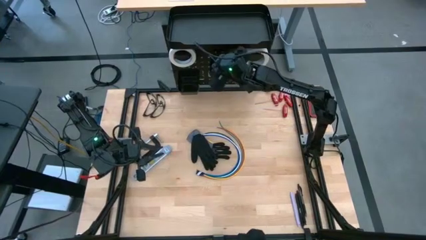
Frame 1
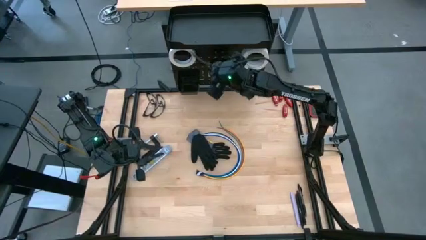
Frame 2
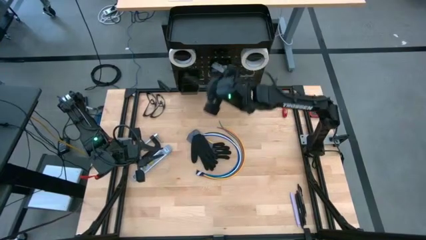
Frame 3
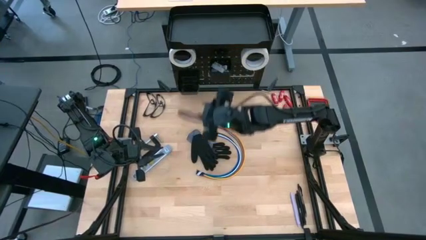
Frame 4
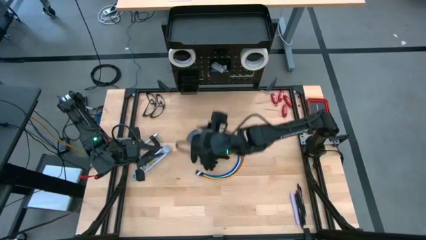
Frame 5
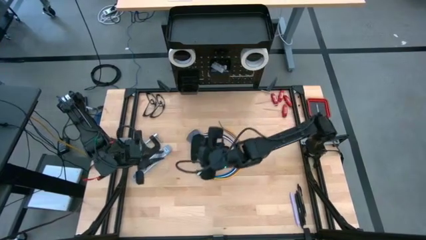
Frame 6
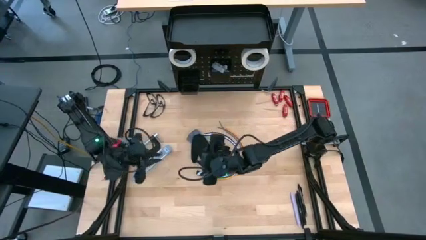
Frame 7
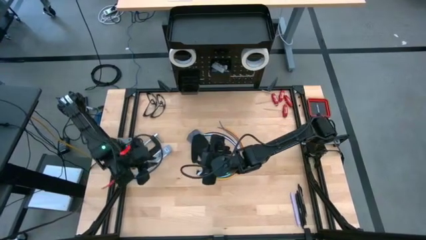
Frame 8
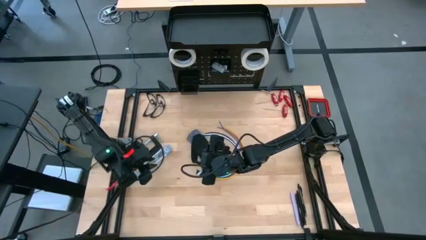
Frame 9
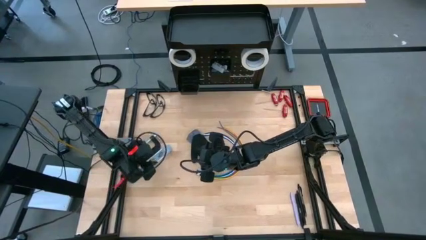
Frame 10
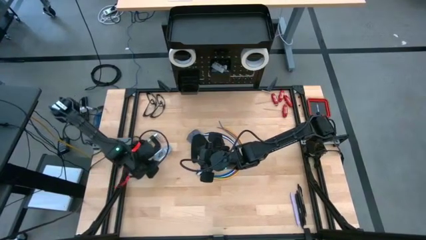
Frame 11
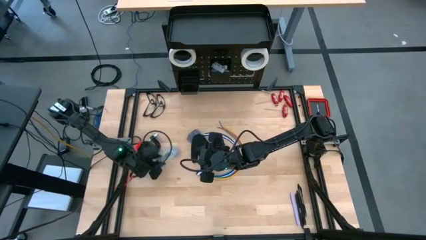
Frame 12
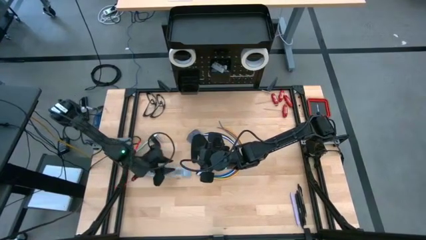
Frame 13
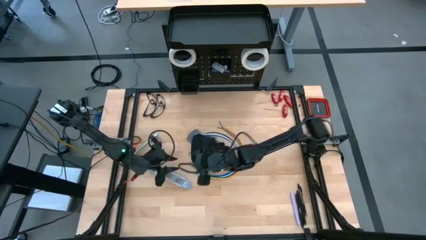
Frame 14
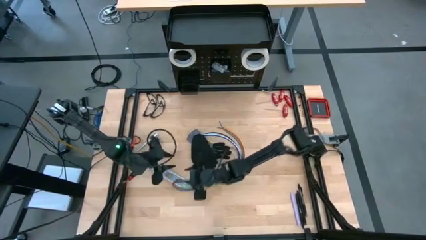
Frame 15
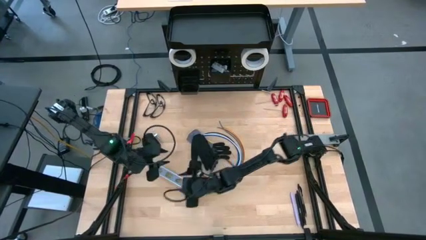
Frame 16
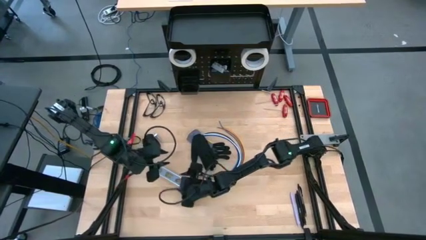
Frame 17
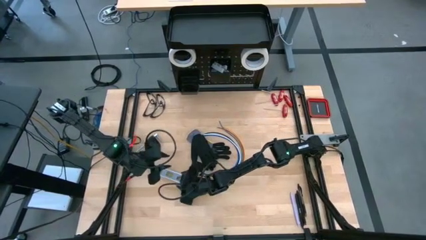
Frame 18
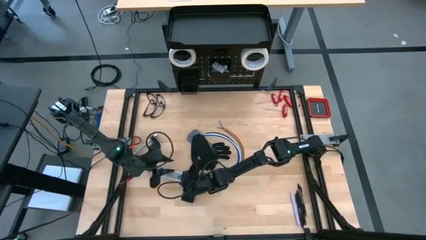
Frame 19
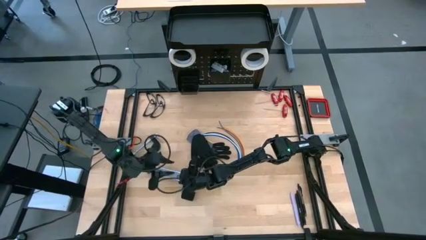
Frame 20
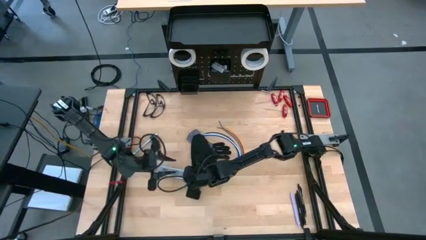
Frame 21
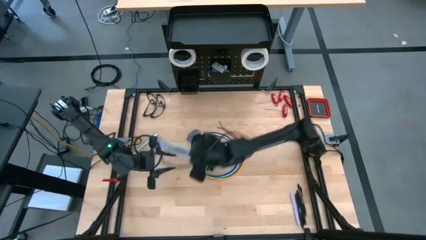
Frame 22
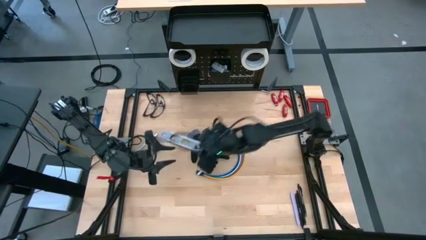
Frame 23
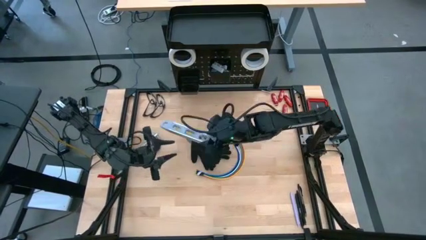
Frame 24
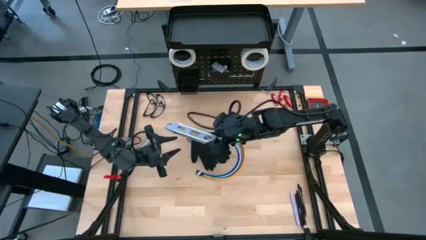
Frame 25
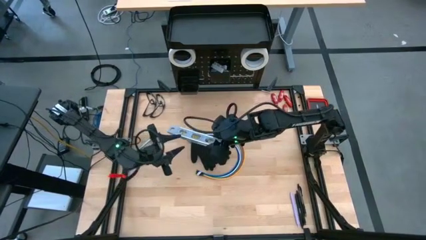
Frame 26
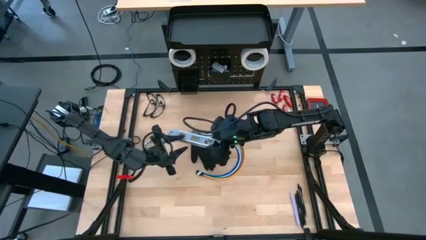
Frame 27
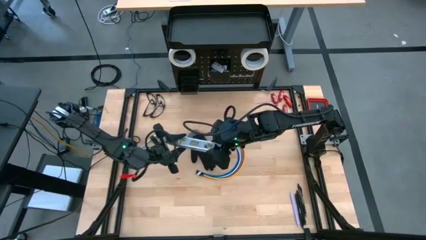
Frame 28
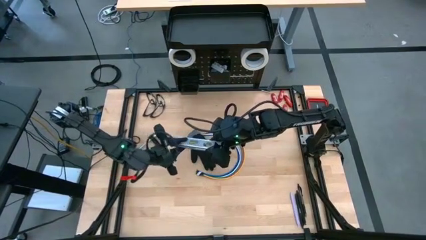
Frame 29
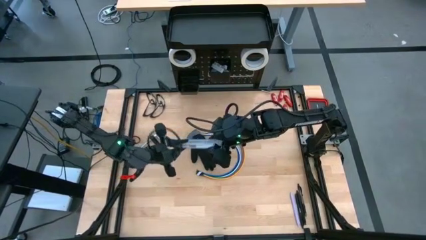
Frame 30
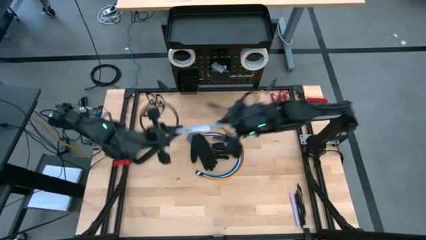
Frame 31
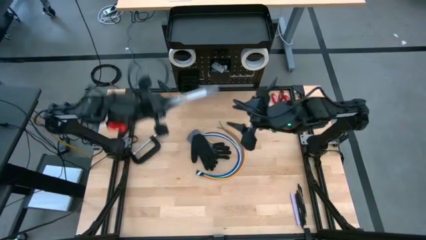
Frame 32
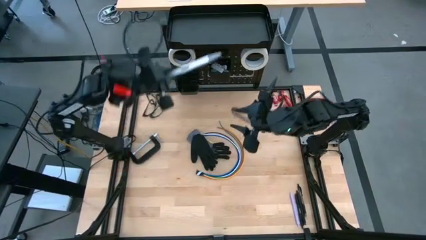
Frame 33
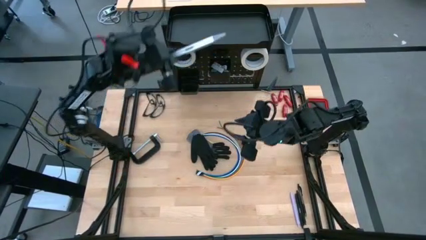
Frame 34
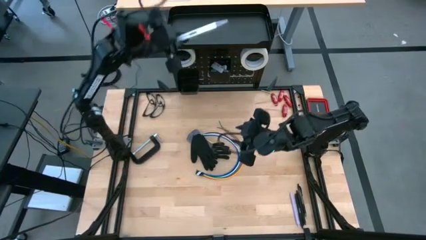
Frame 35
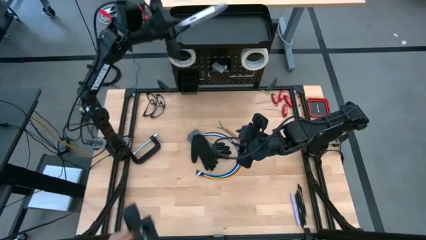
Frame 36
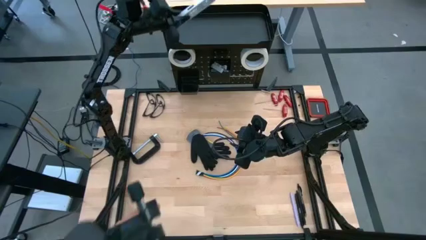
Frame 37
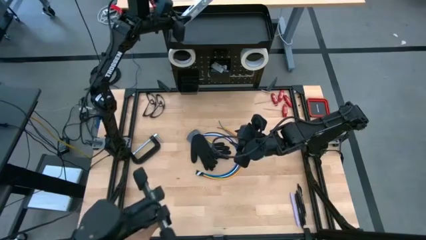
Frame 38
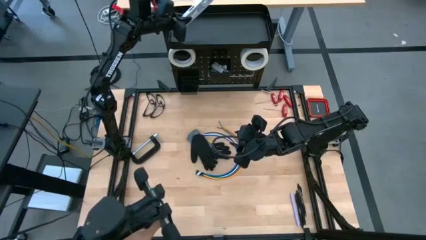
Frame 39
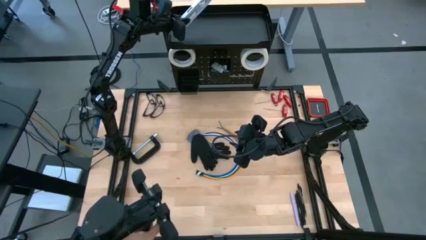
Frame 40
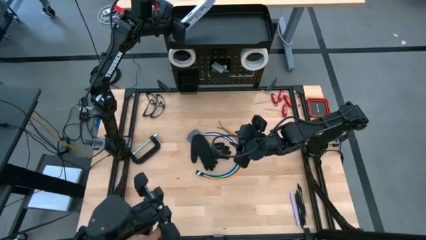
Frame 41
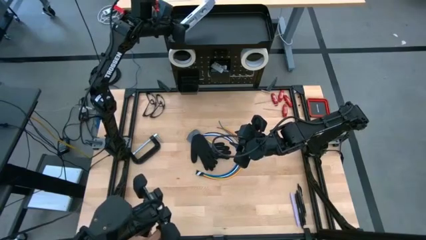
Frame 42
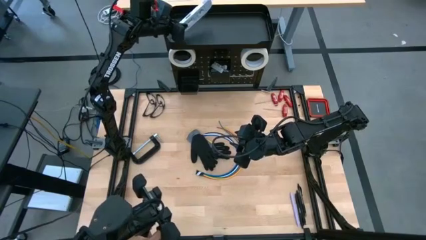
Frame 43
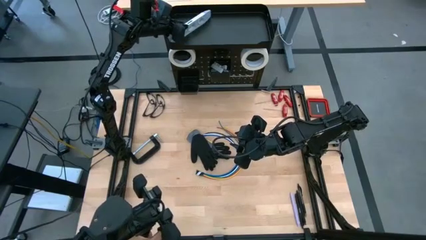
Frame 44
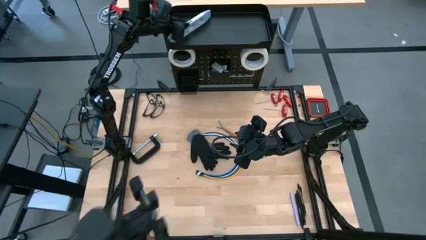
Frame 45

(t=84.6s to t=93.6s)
Task: Hang tools onto peg board
Put the spirit level on the peg board

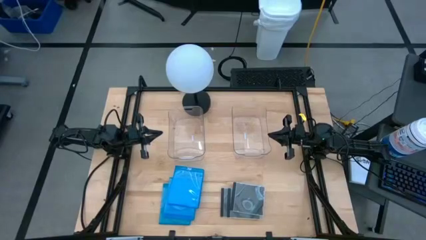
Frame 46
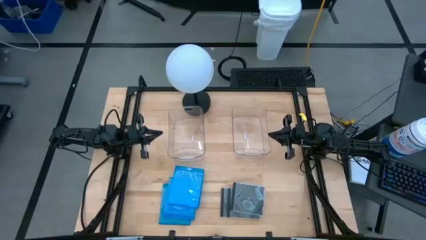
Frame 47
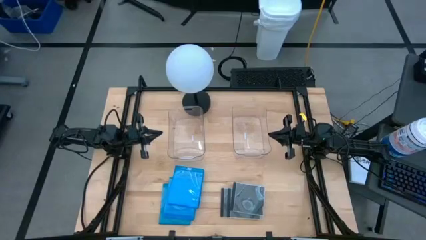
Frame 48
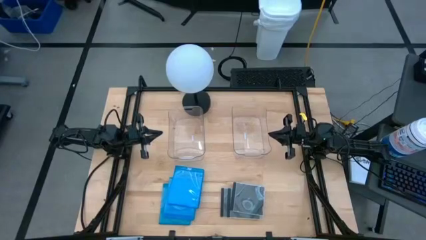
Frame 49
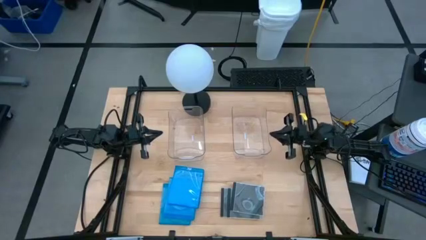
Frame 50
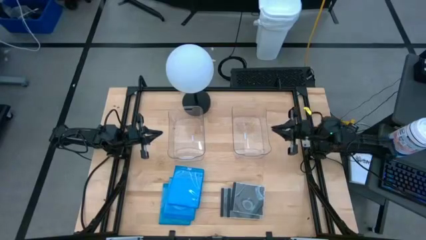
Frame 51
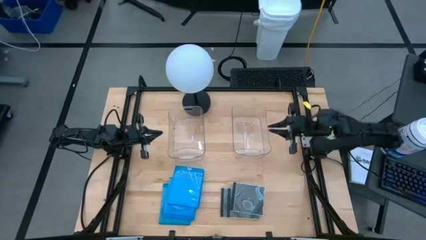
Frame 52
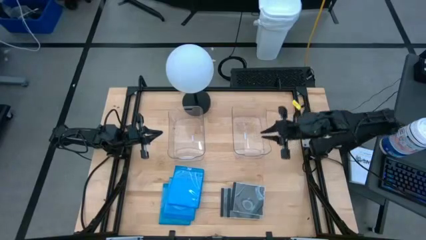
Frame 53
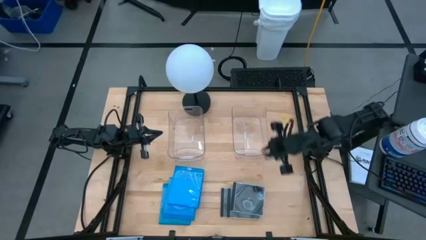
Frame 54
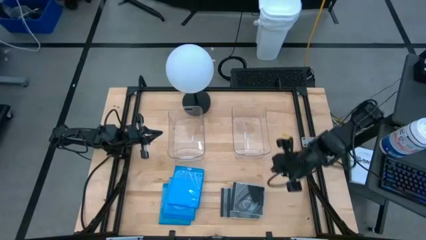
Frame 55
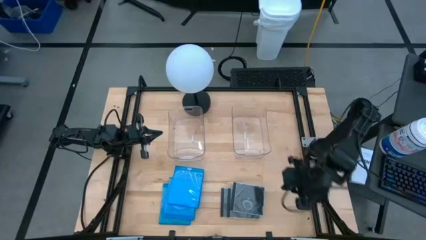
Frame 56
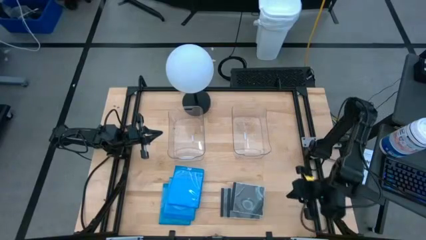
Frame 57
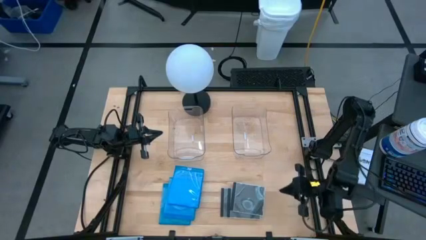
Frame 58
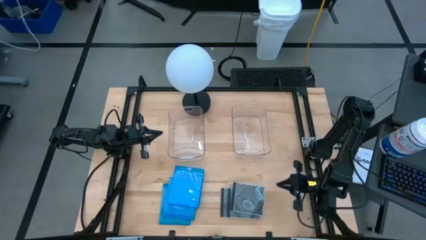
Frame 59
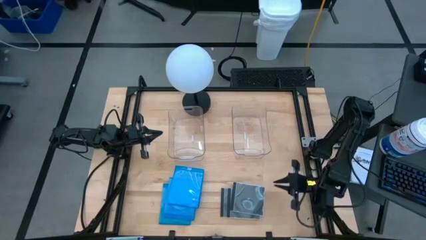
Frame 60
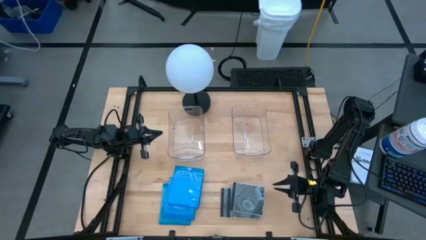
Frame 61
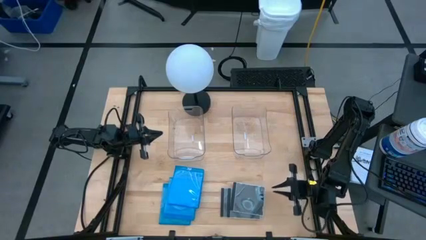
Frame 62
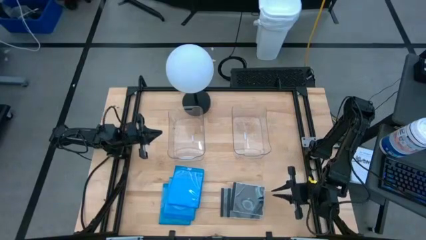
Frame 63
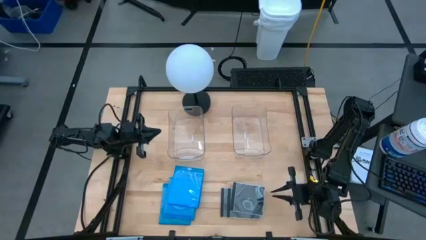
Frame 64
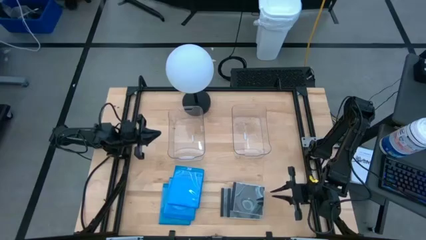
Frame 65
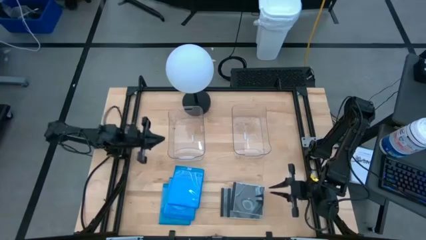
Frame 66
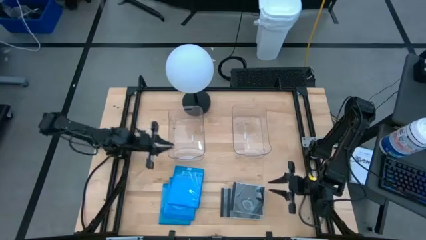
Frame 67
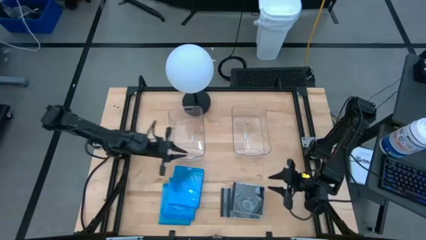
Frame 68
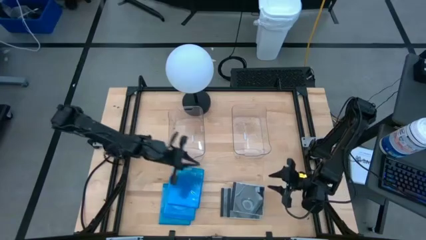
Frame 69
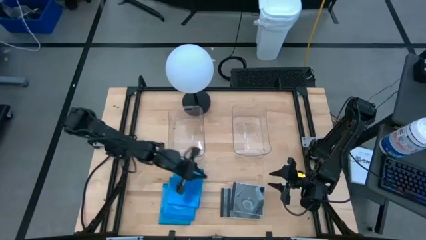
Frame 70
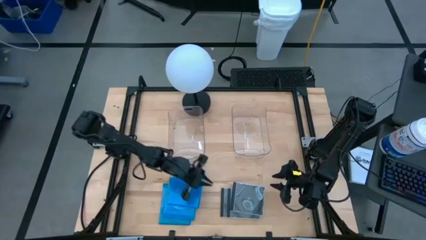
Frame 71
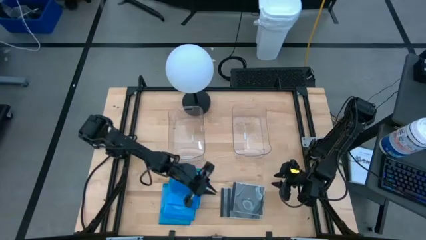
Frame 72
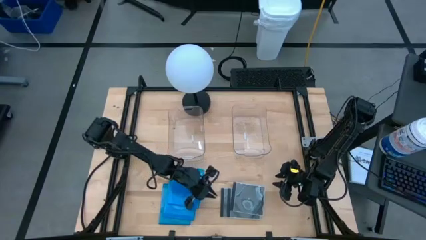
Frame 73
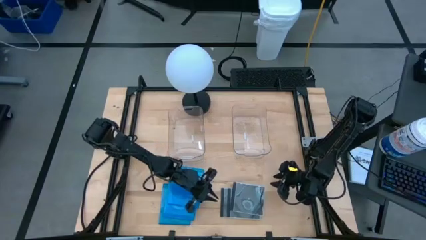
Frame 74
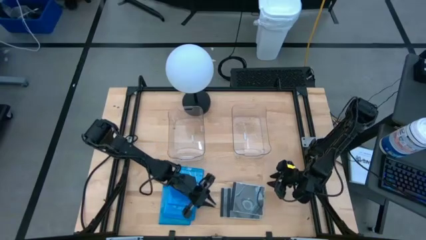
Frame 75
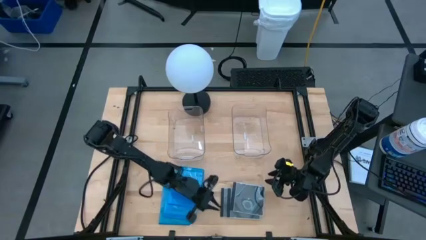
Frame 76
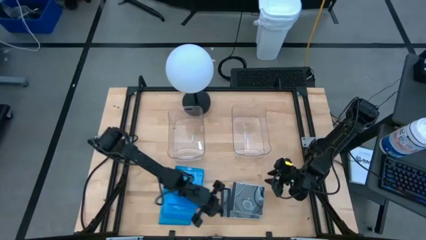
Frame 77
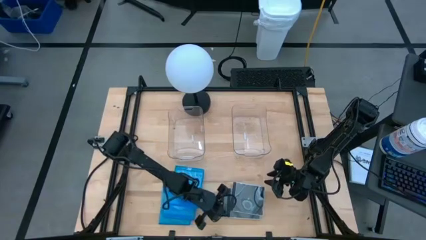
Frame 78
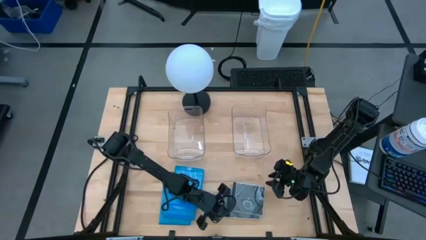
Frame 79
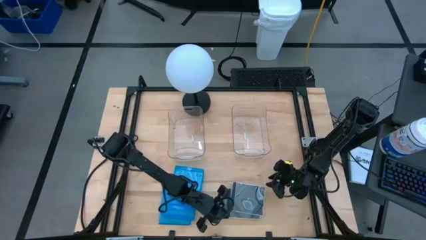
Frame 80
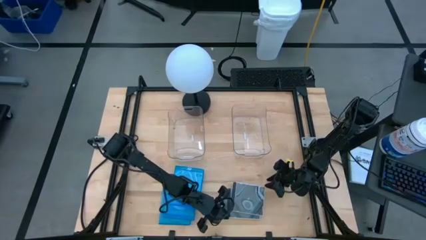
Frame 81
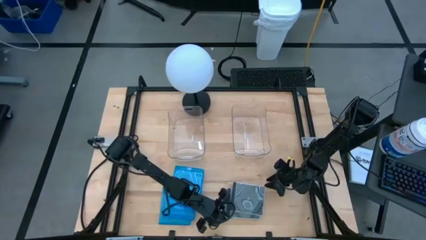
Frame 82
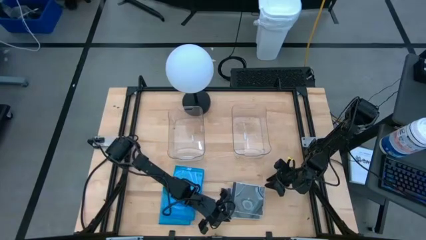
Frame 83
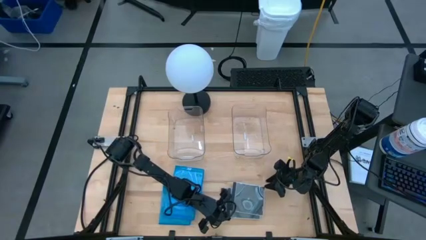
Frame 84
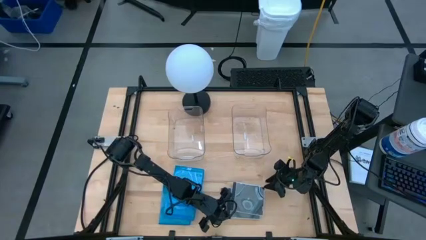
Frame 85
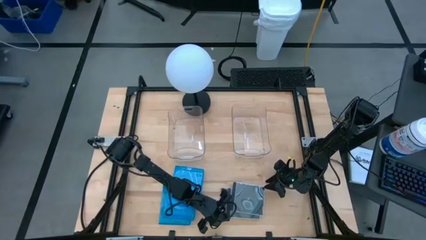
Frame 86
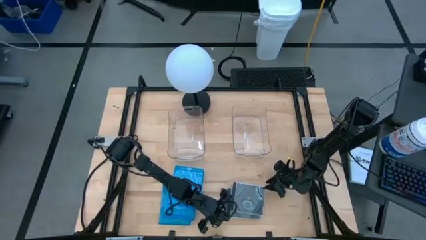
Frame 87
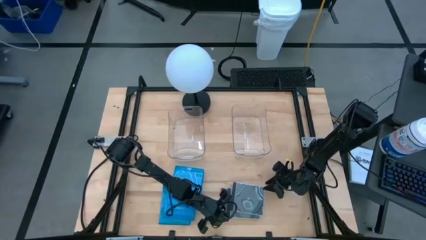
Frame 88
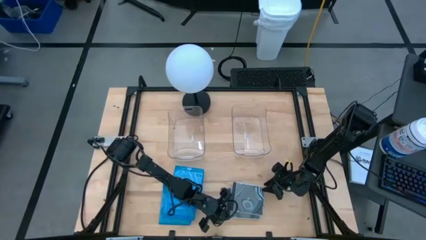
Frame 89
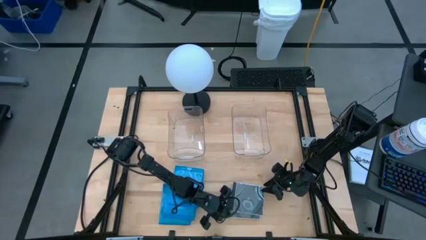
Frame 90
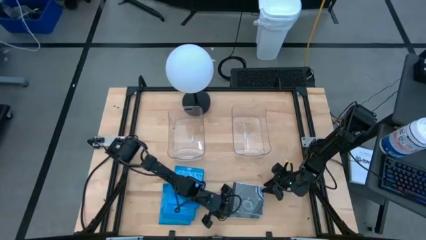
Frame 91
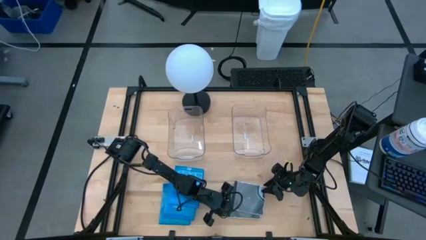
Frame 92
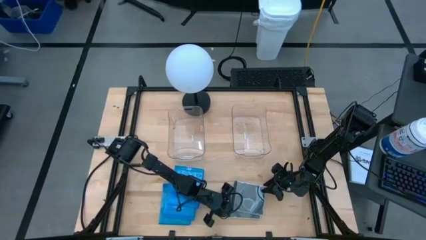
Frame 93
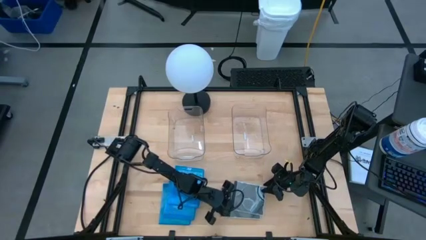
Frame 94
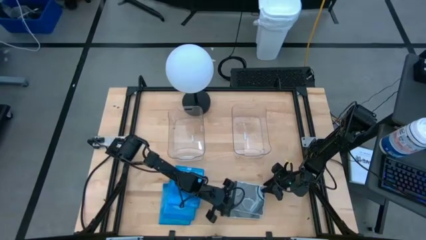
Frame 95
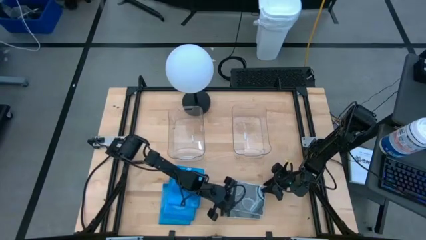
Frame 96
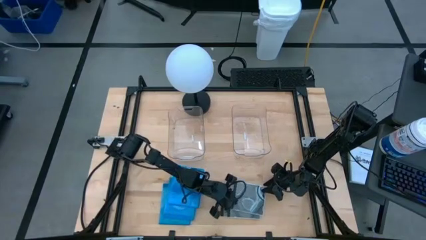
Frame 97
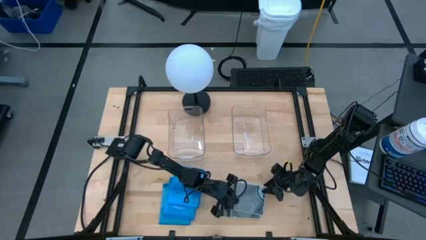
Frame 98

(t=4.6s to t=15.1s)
Task: Pick & place jewel cases by type
Put the black CD case into the right transparent bin
